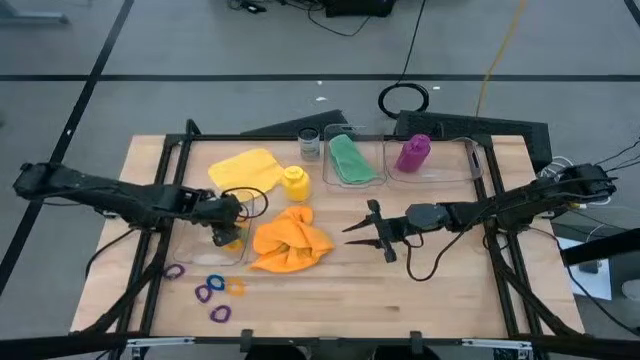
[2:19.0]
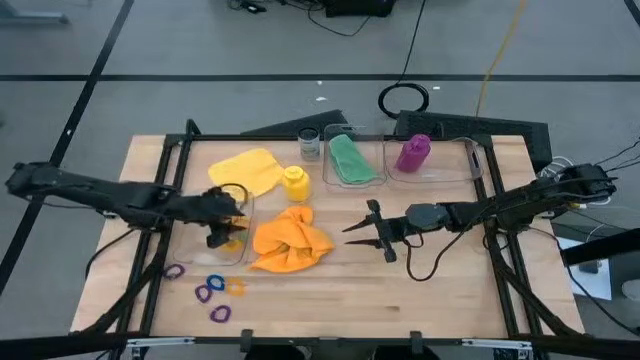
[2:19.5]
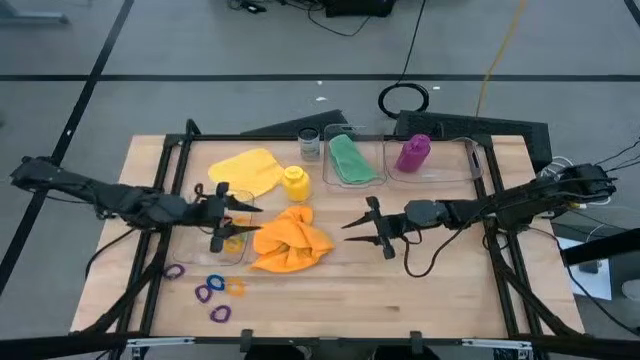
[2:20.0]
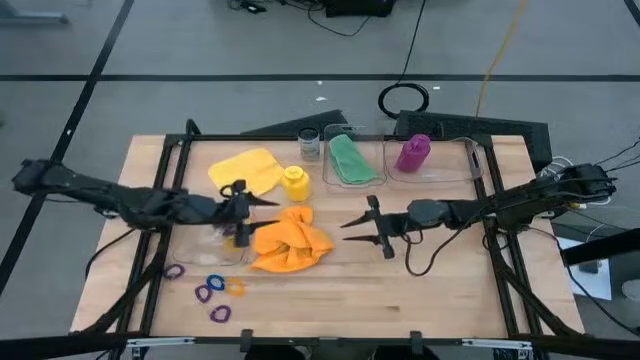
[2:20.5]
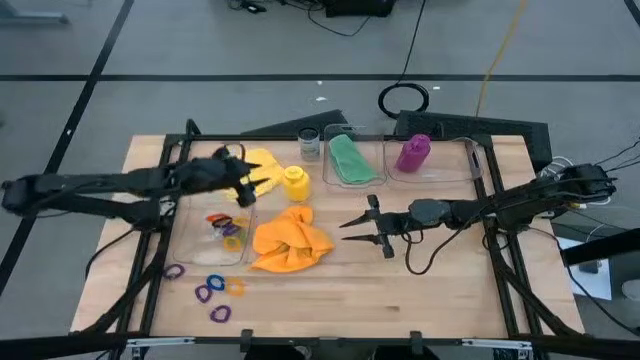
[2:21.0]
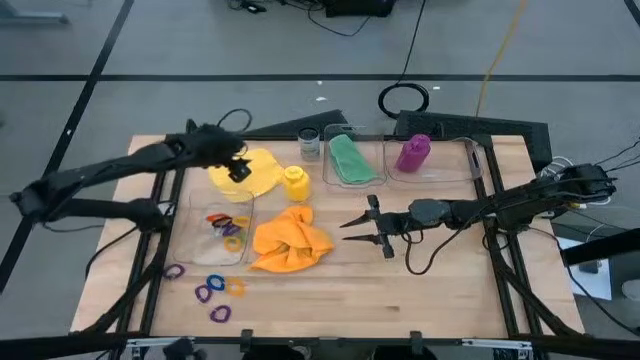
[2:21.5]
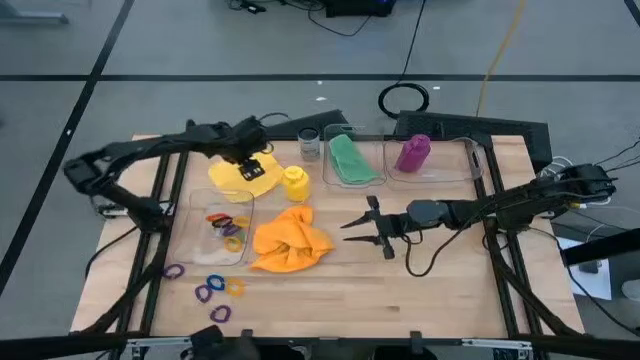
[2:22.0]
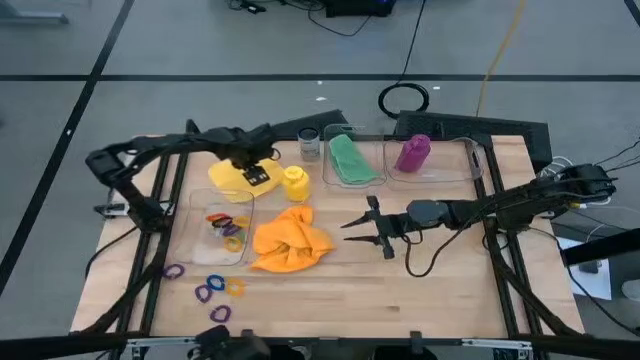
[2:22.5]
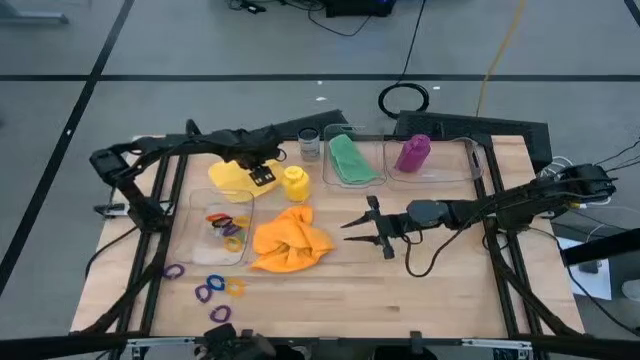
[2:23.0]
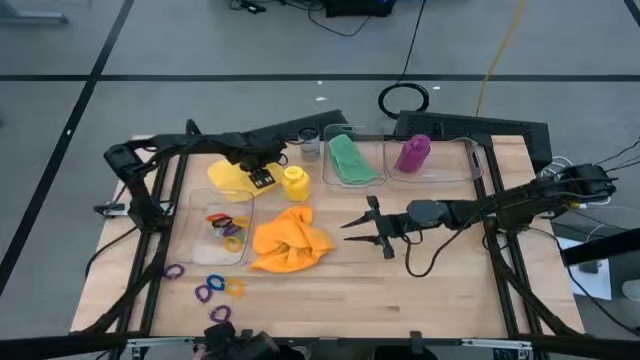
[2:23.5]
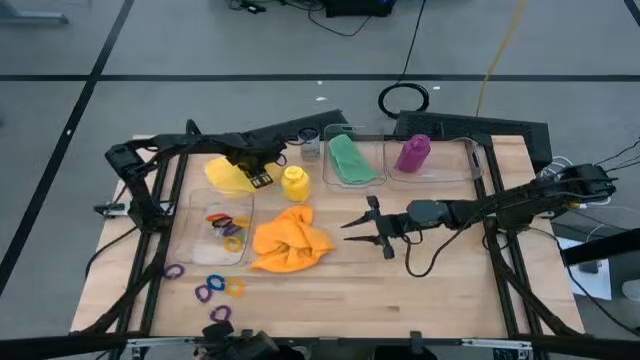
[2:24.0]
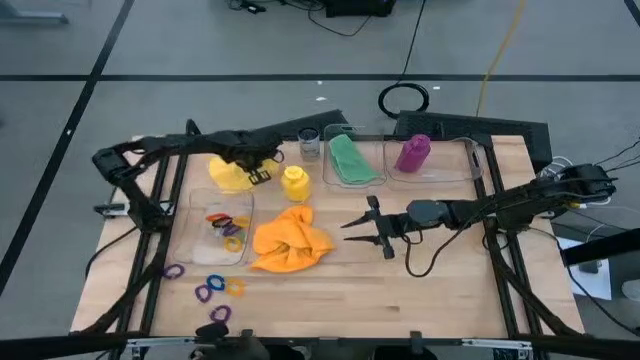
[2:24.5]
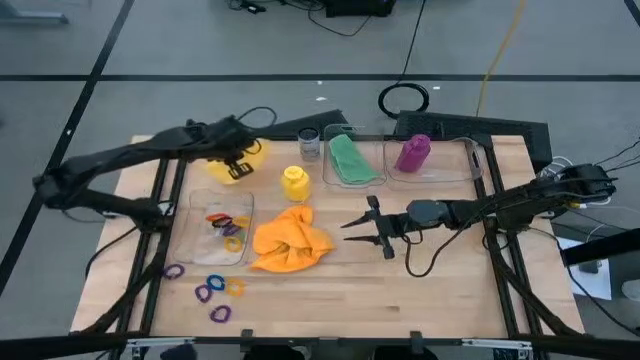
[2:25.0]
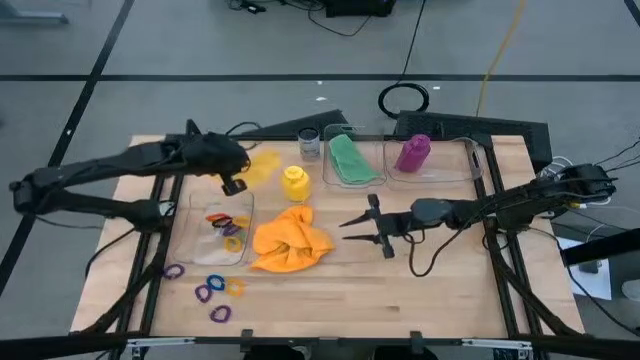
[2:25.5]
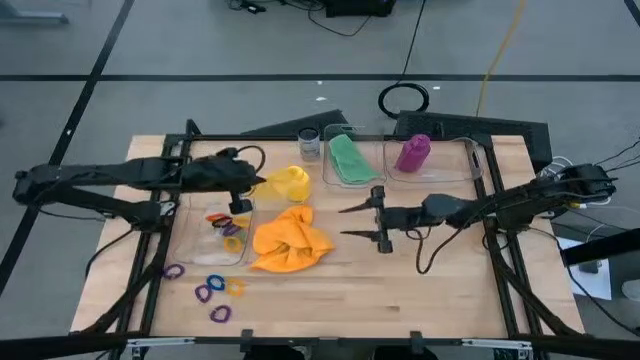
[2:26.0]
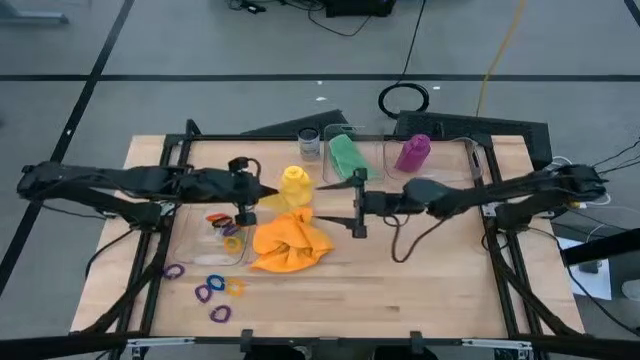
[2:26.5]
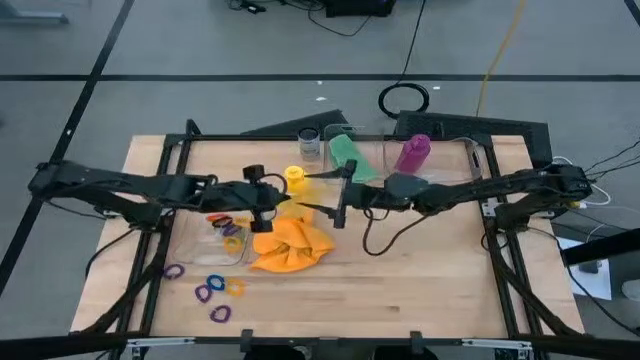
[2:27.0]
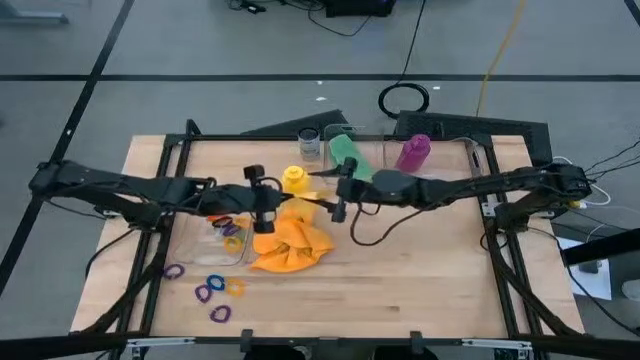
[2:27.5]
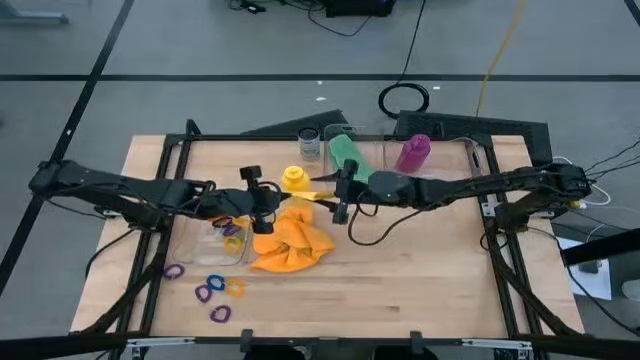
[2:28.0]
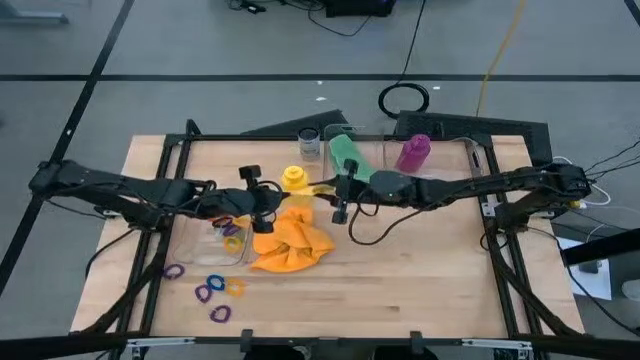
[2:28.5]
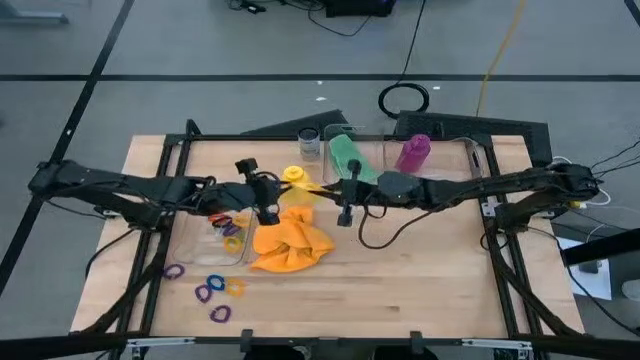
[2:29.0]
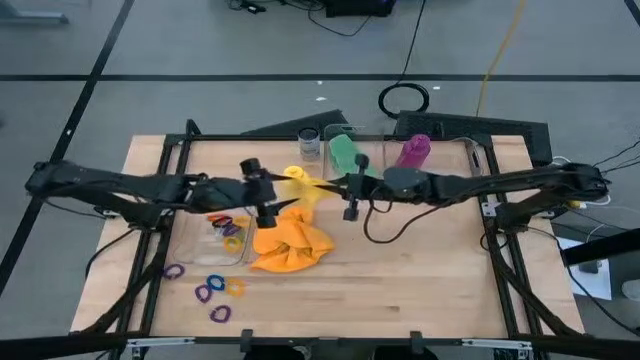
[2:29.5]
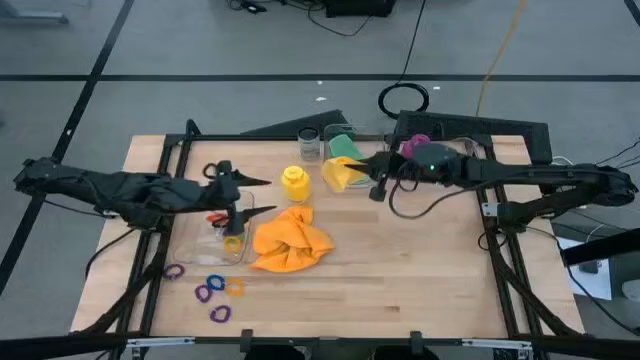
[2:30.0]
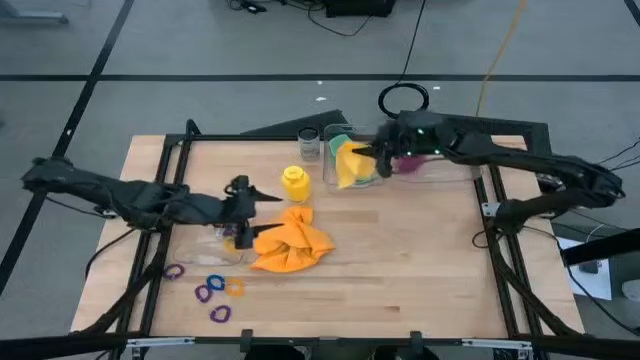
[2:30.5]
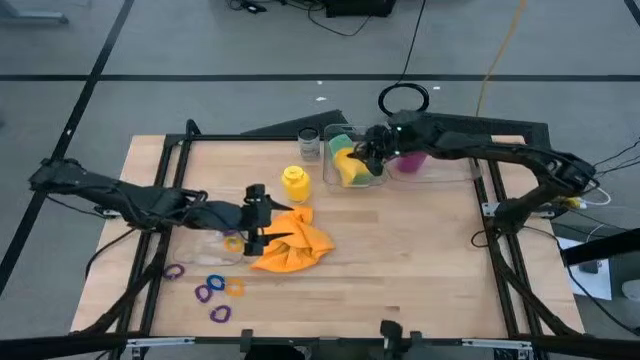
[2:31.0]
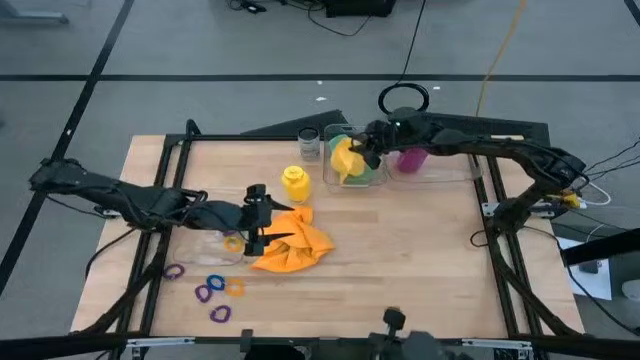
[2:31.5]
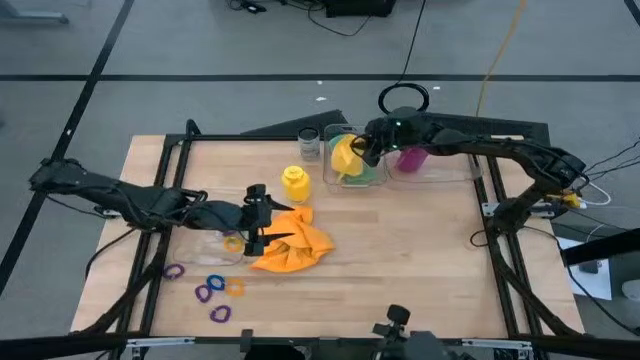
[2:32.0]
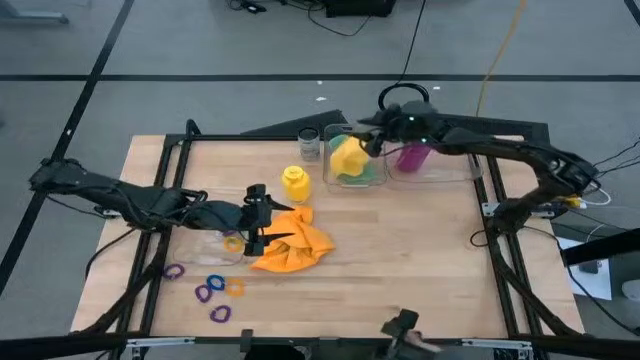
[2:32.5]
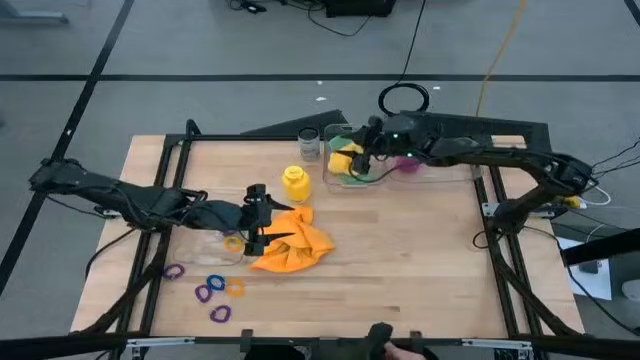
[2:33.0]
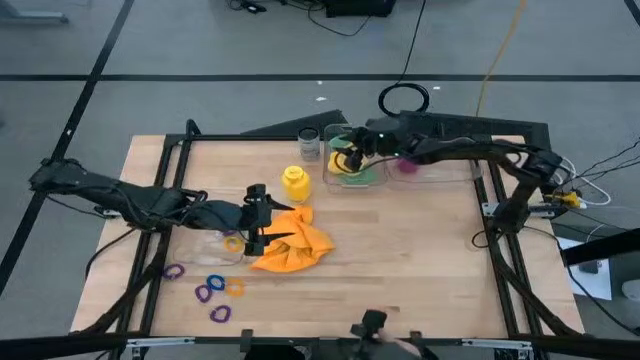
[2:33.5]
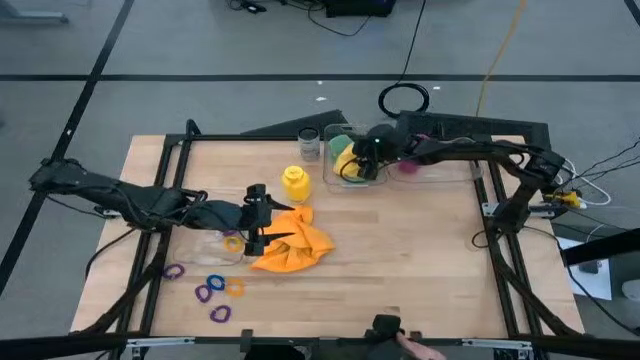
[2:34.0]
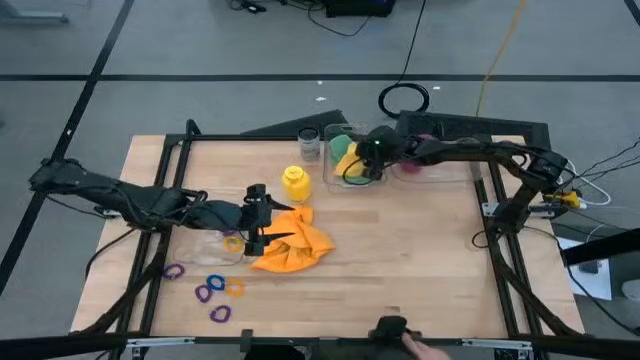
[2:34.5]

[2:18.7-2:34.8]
Task: Pick & Place Sports Items
Put the yellow towel into the top left transparent bin
